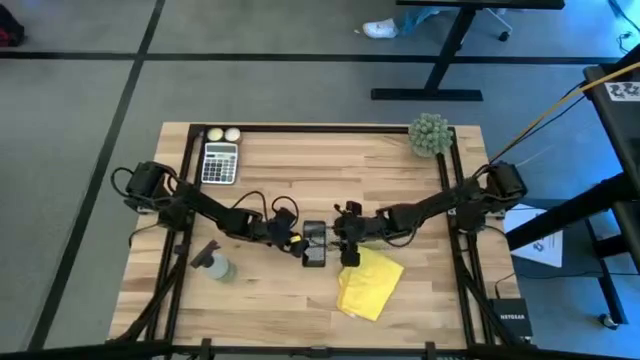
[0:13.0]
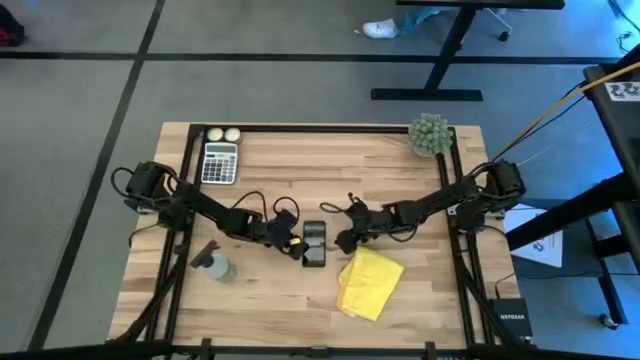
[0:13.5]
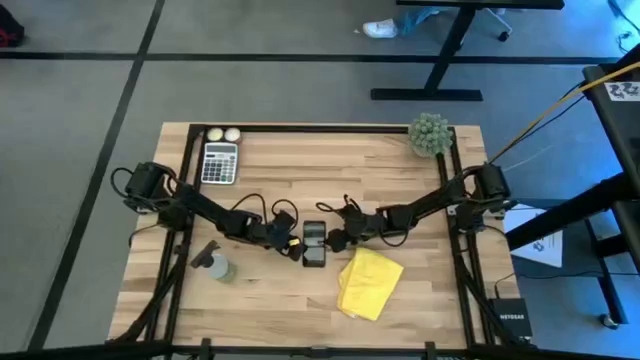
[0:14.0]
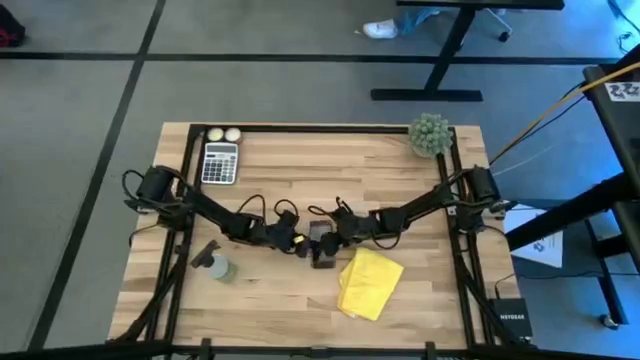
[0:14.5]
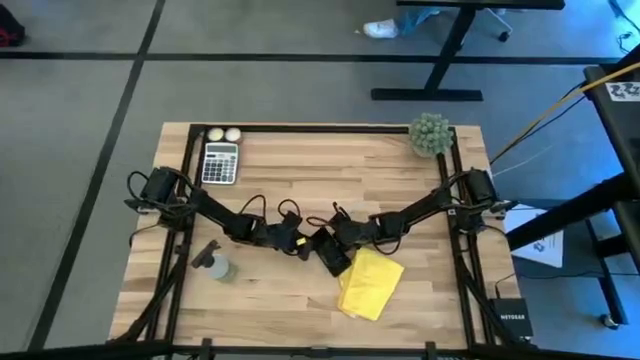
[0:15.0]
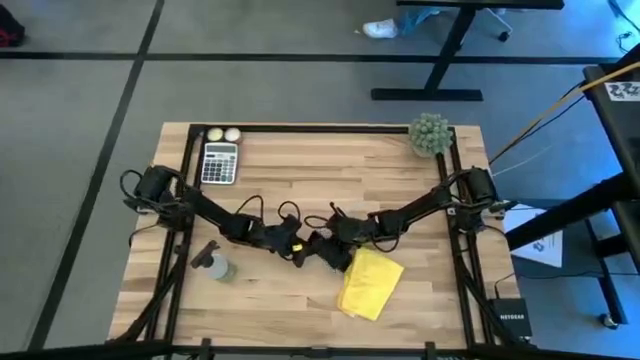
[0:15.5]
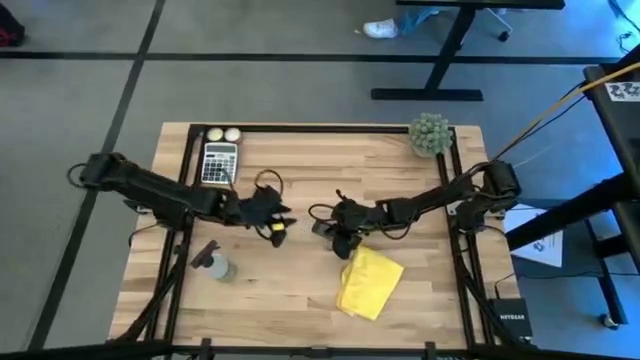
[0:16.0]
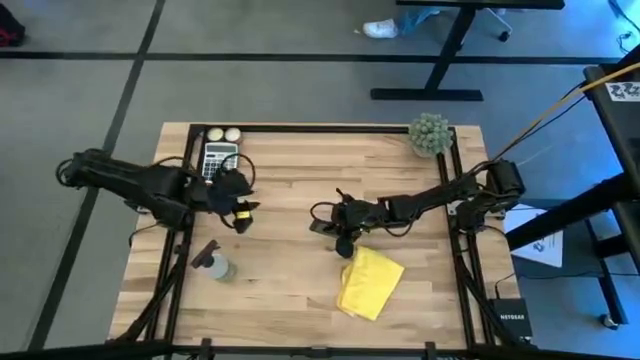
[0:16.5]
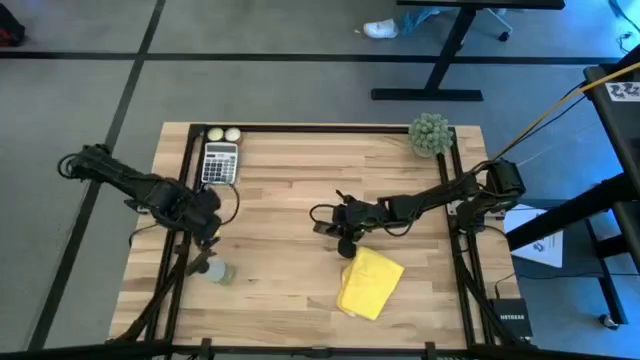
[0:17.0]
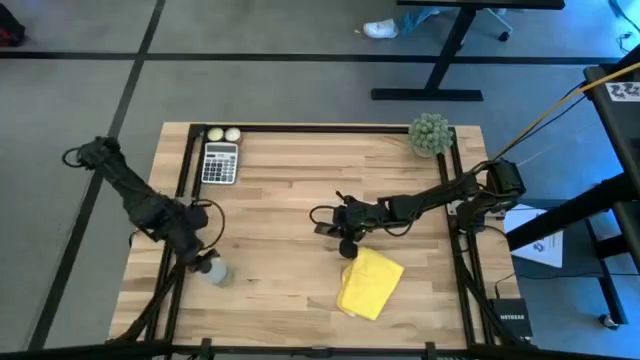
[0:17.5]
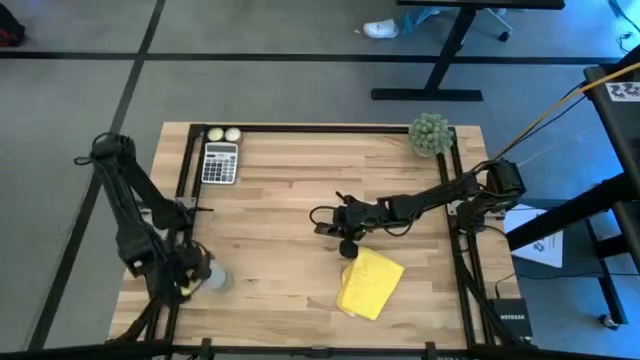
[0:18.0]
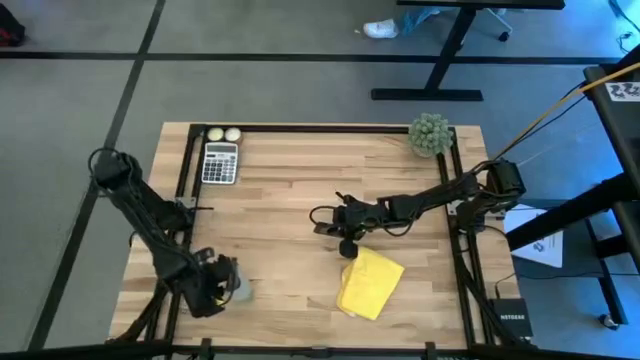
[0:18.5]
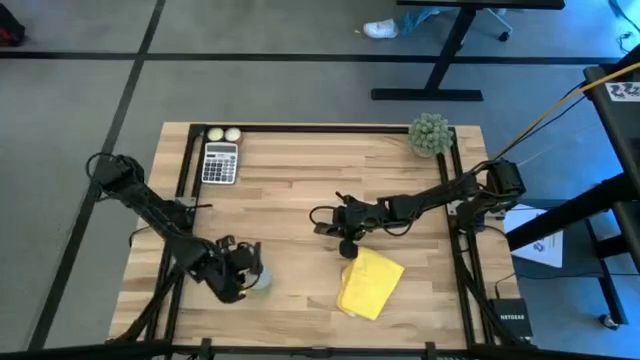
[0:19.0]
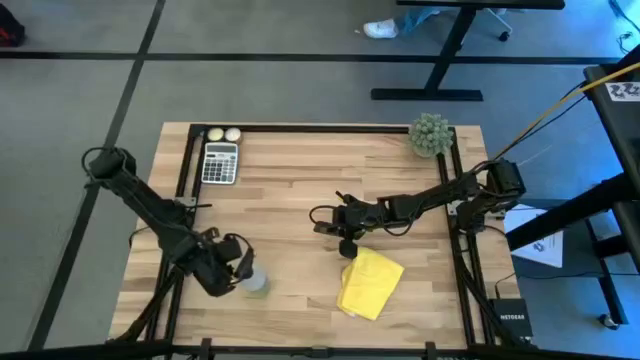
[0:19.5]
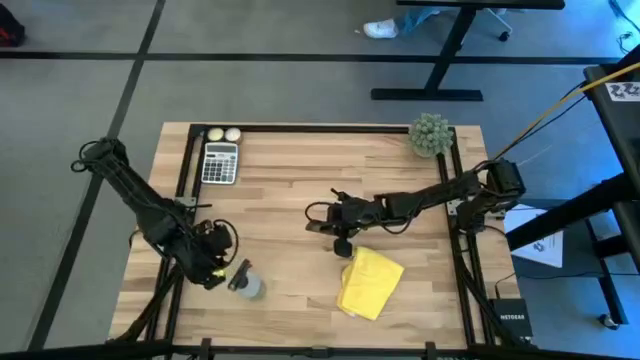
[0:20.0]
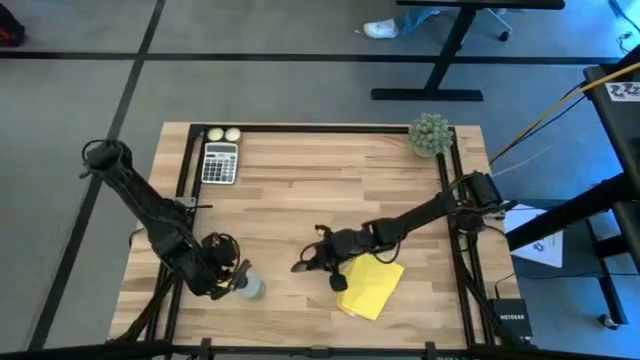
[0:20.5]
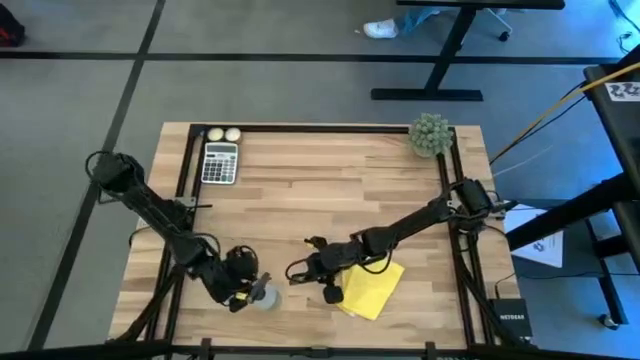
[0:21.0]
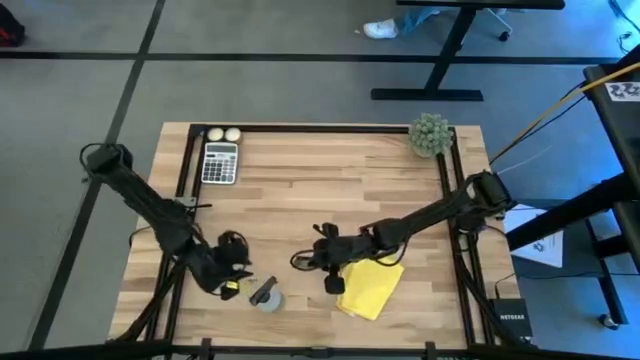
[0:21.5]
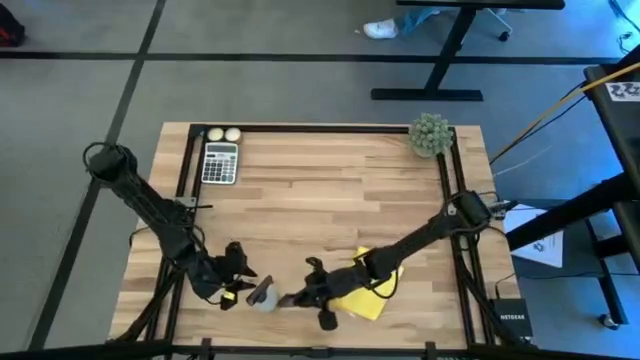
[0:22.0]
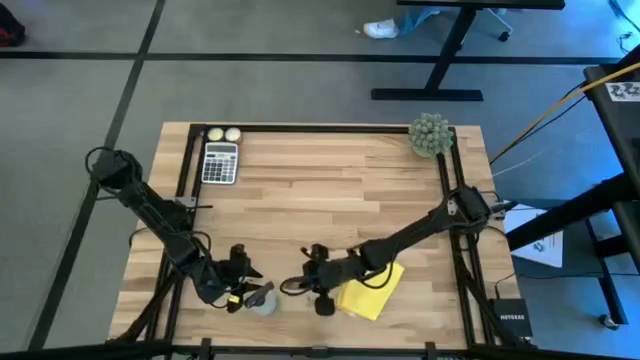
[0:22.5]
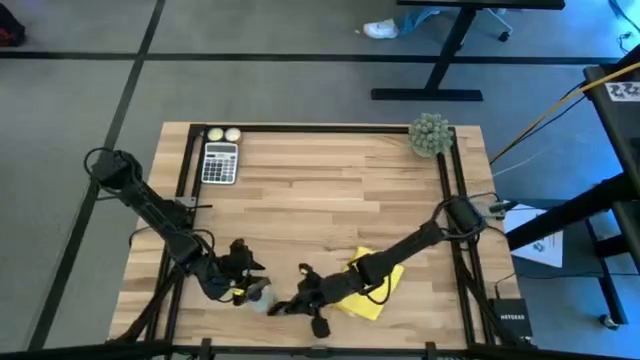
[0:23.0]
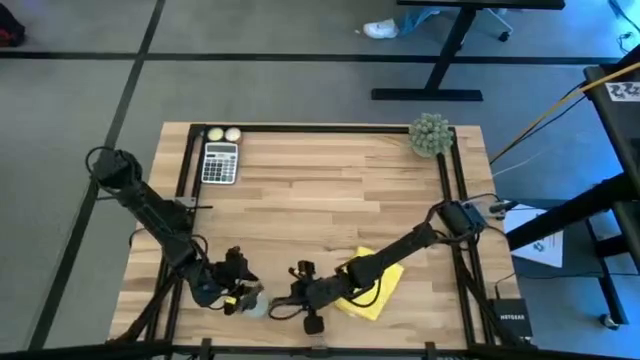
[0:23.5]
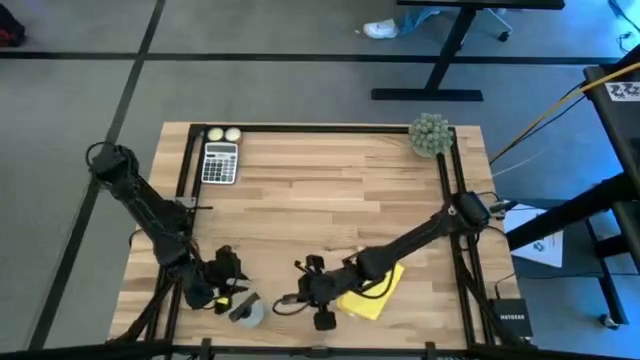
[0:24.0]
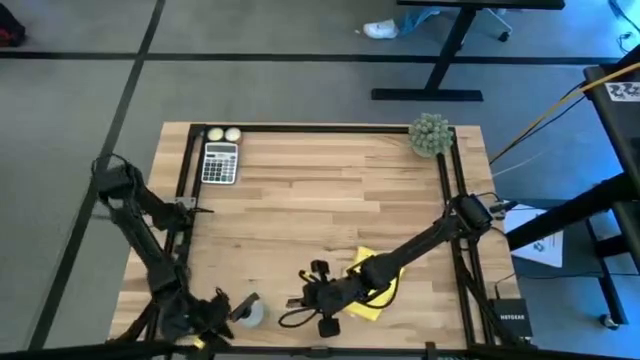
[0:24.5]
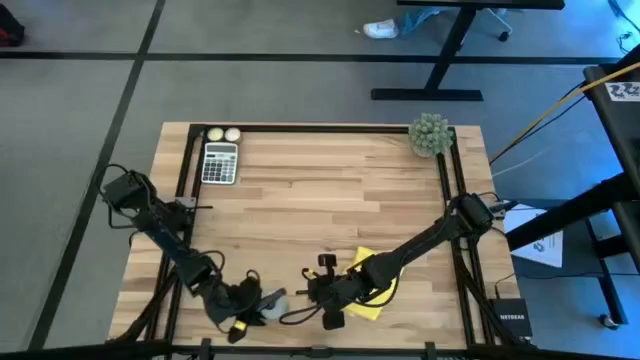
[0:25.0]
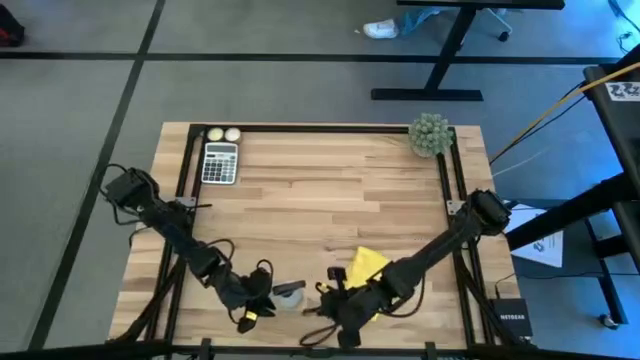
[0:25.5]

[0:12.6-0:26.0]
Task: Apply microfiber cloth
Spray the front of the black cellphone with green spray bottle

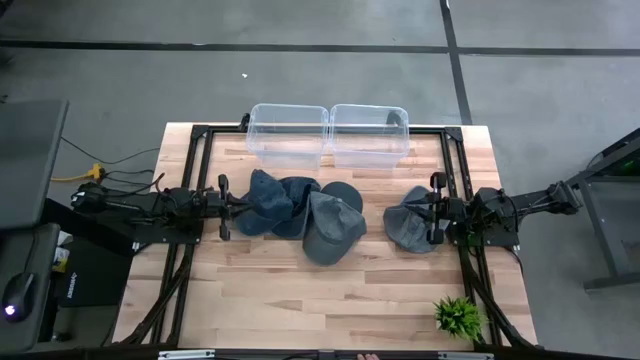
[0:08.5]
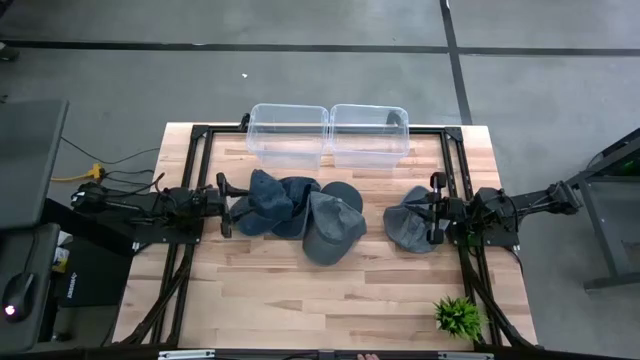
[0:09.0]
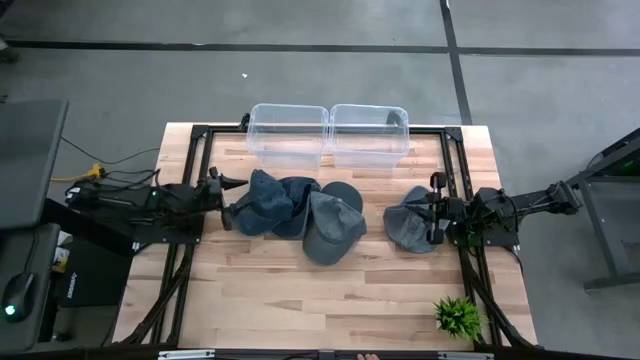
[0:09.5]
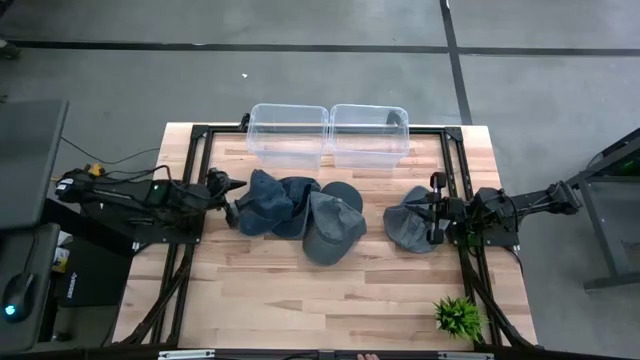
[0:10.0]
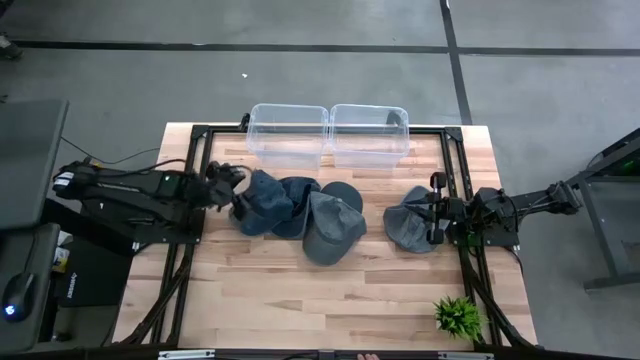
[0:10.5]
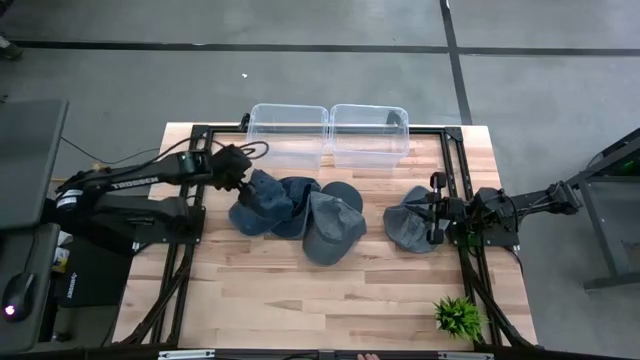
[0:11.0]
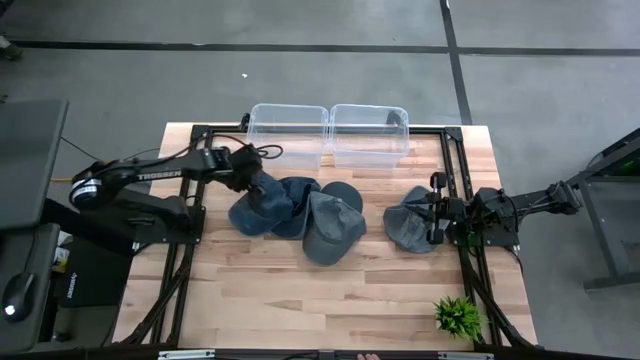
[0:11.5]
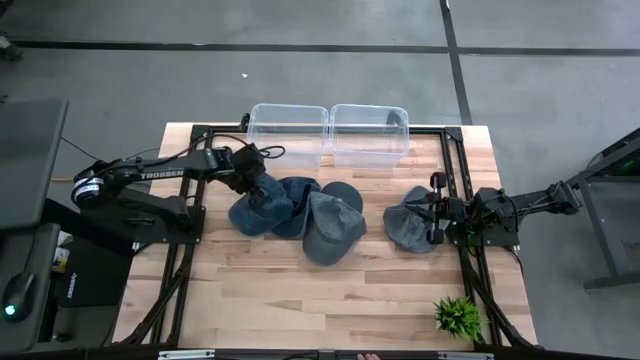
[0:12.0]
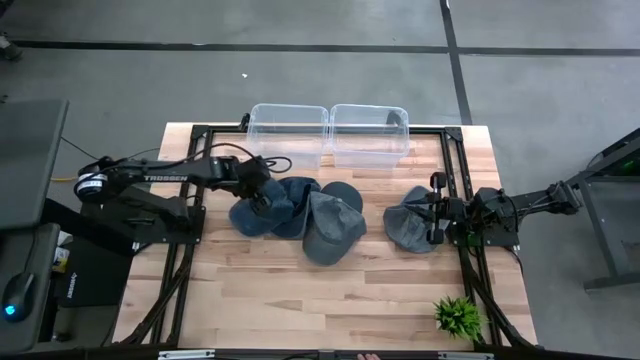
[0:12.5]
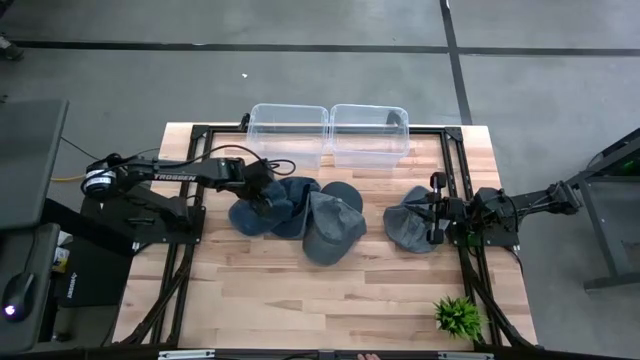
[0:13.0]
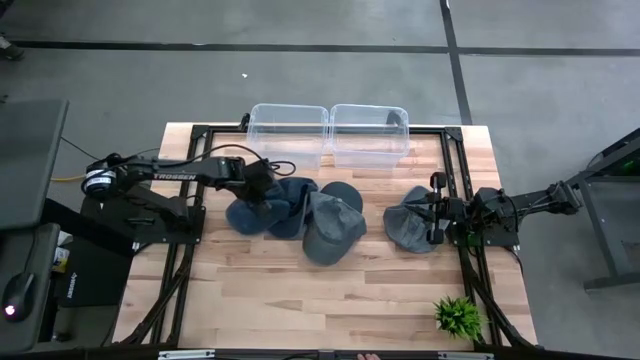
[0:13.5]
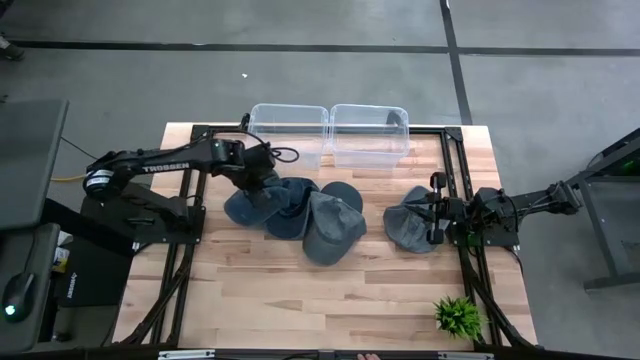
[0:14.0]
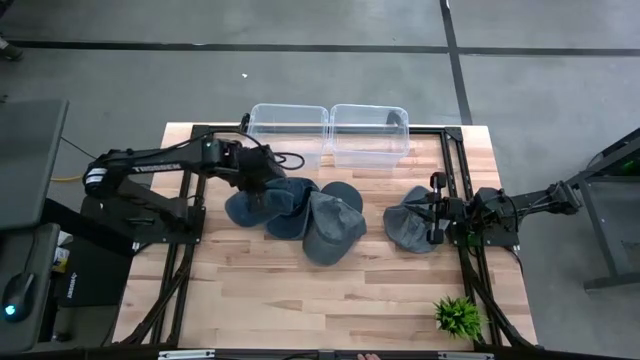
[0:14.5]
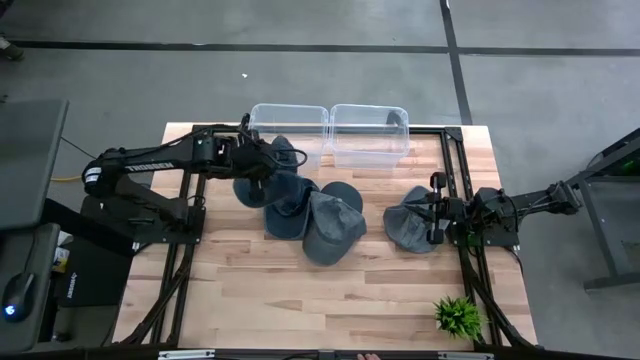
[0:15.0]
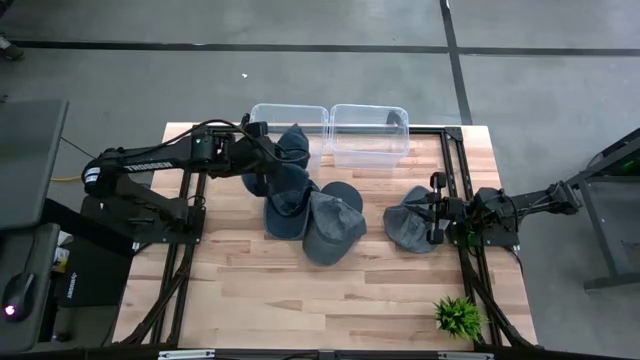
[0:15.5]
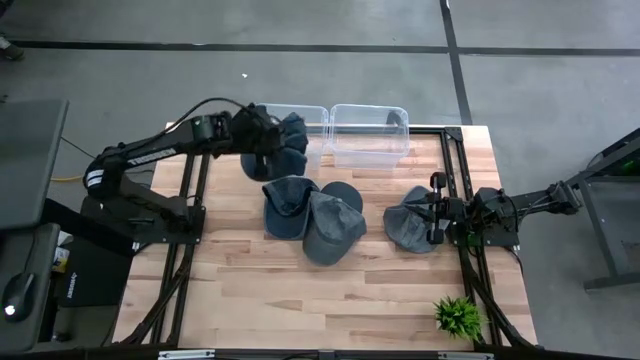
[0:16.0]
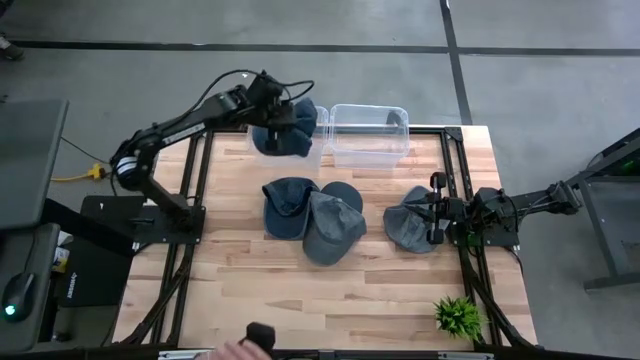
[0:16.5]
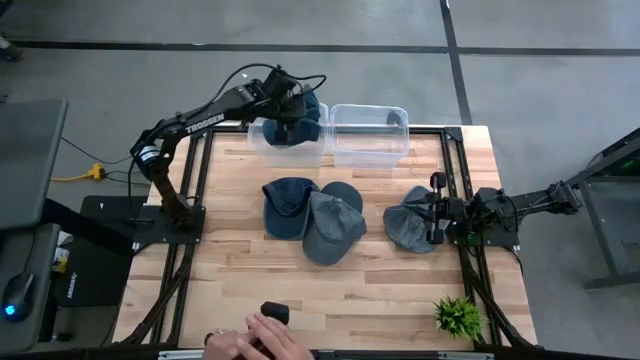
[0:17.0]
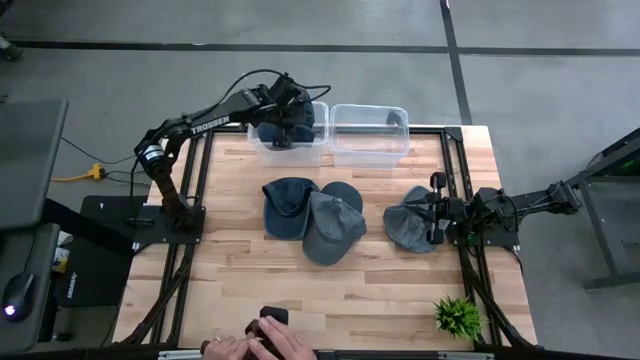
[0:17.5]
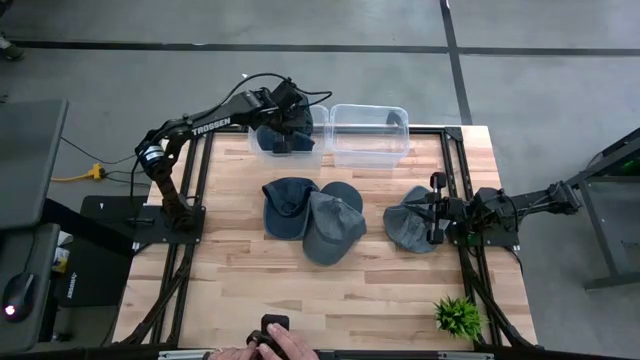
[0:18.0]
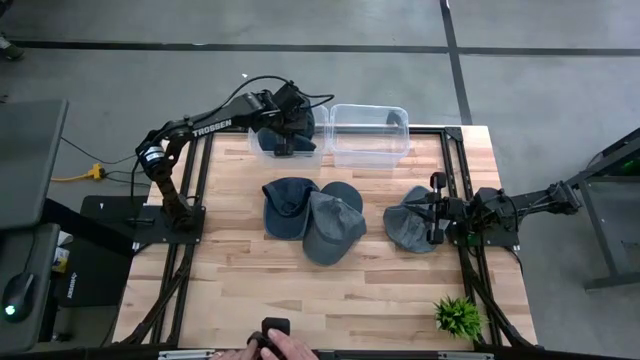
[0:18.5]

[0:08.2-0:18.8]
Task: Pick and place caps into container
Put the left blue cap into the left transparent container
